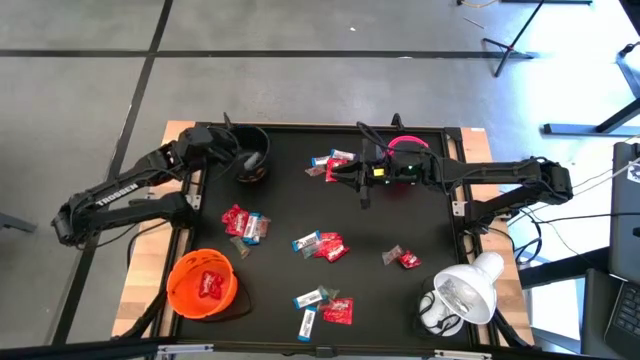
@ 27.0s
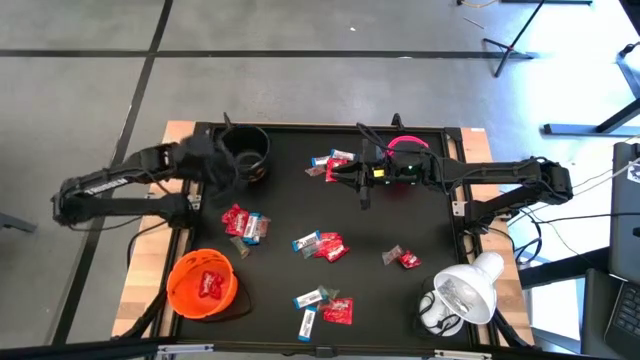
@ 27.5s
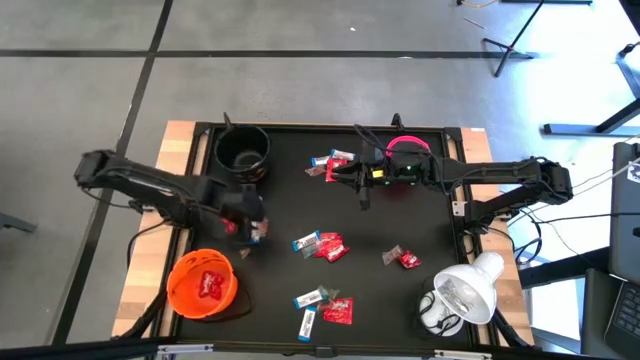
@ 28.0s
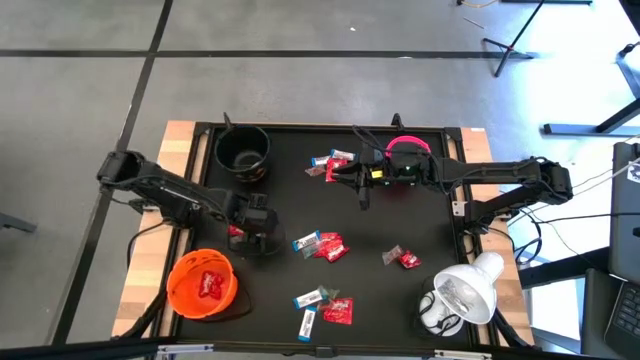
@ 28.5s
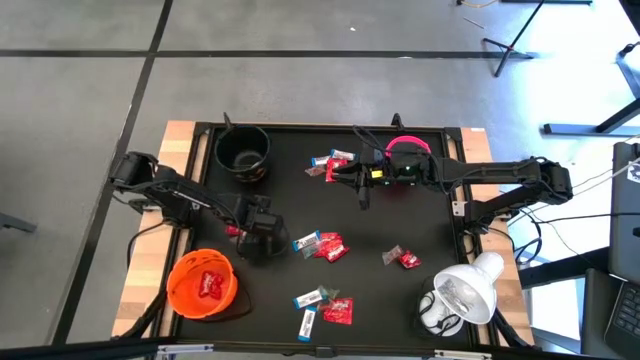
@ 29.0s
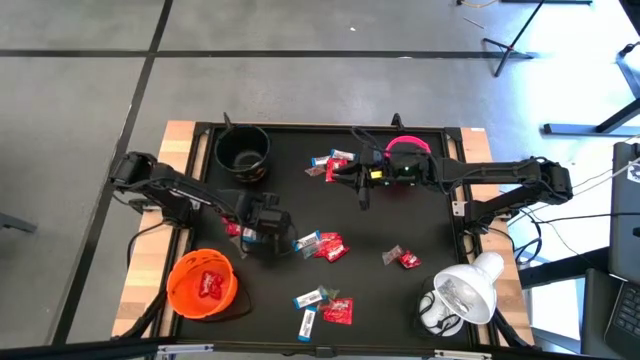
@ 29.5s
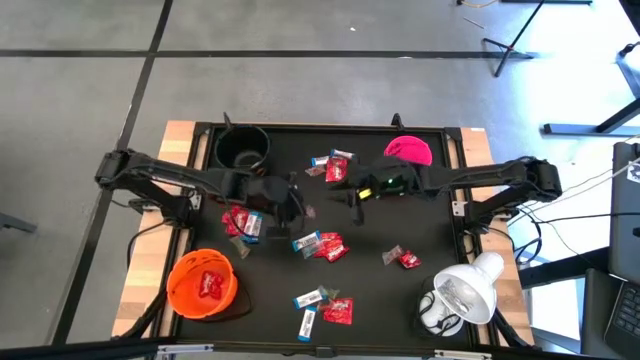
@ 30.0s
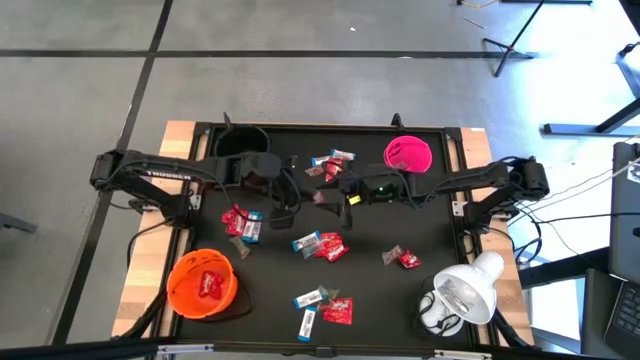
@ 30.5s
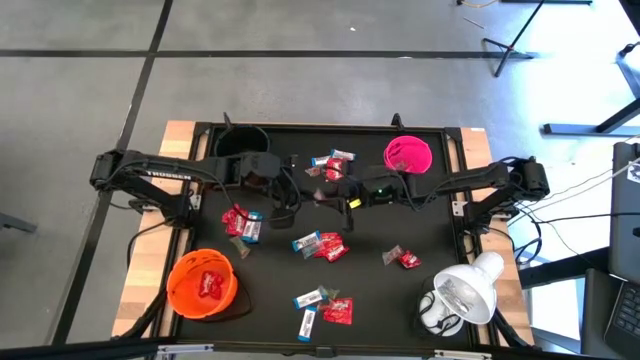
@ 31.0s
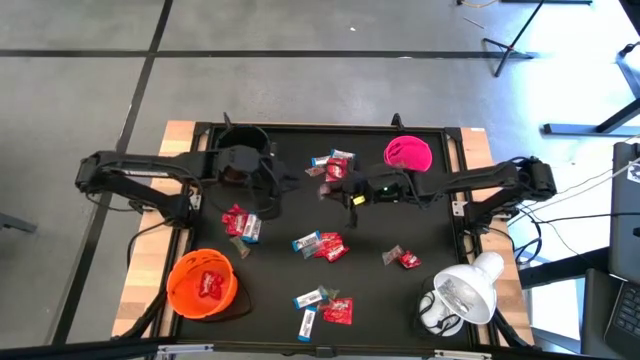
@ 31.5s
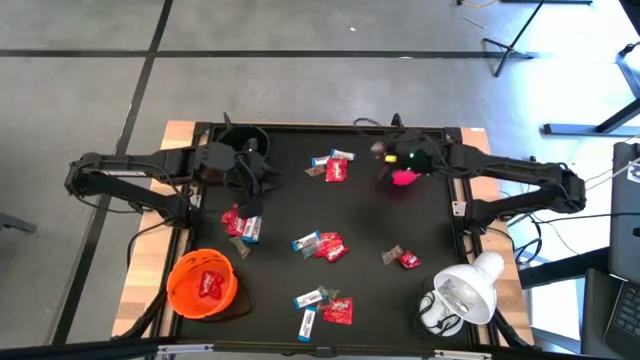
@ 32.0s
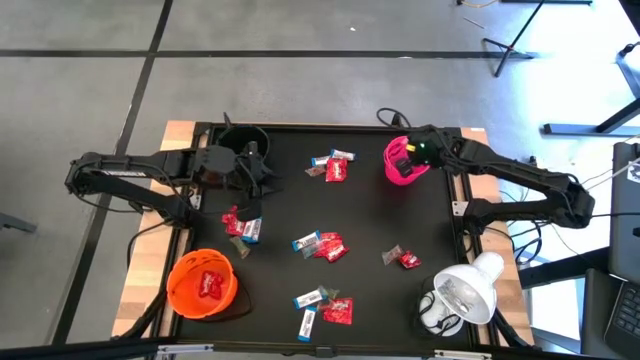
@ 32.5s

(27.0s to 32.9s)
Task: Sort candy
Put the orange gummy into the pink bucket

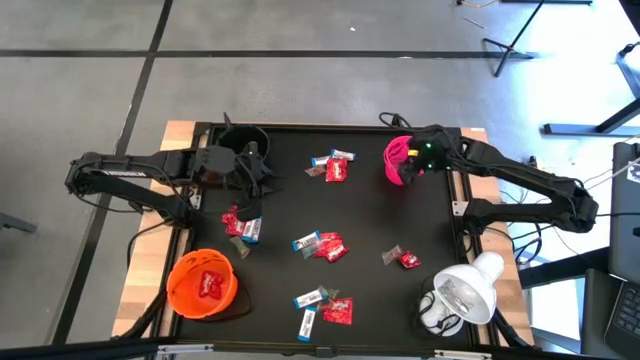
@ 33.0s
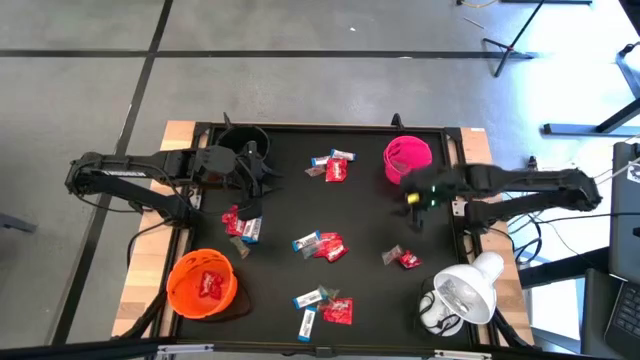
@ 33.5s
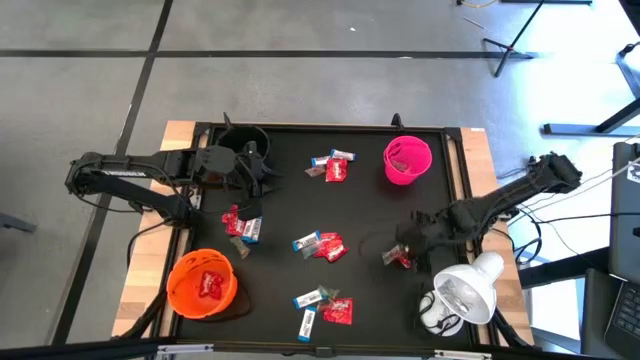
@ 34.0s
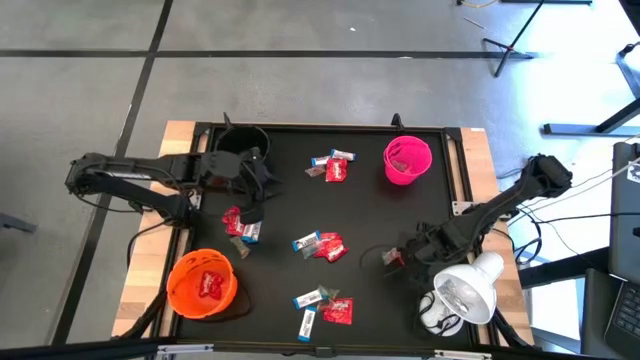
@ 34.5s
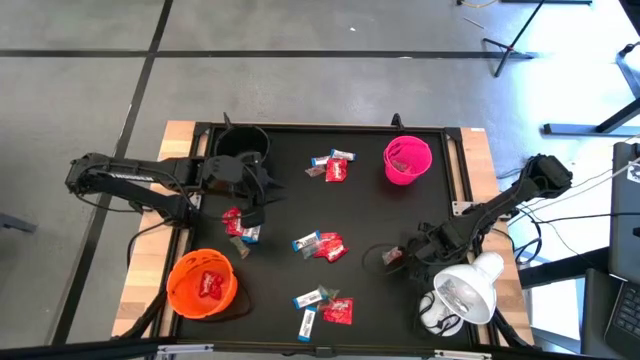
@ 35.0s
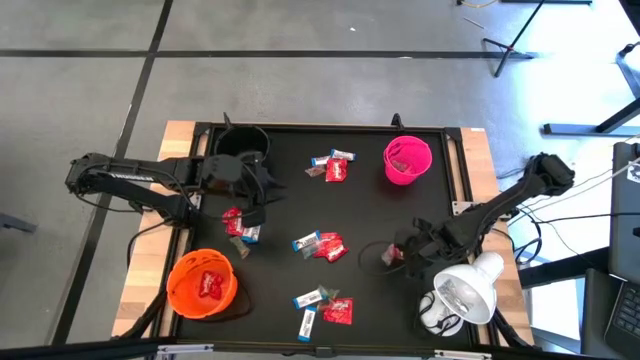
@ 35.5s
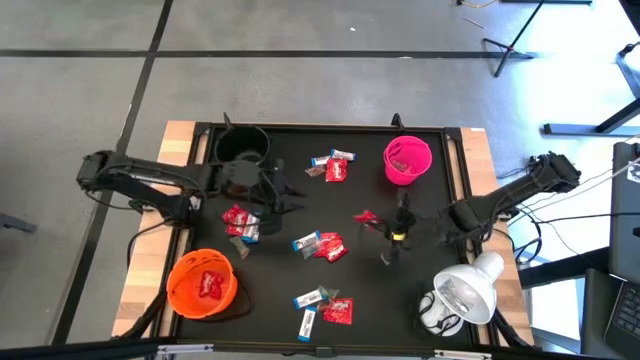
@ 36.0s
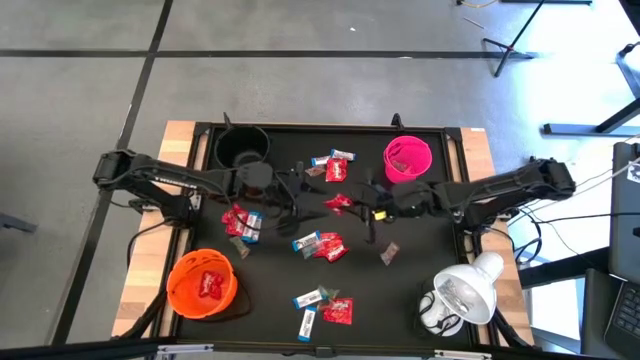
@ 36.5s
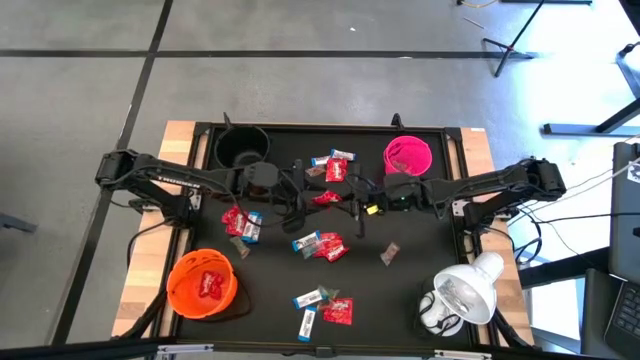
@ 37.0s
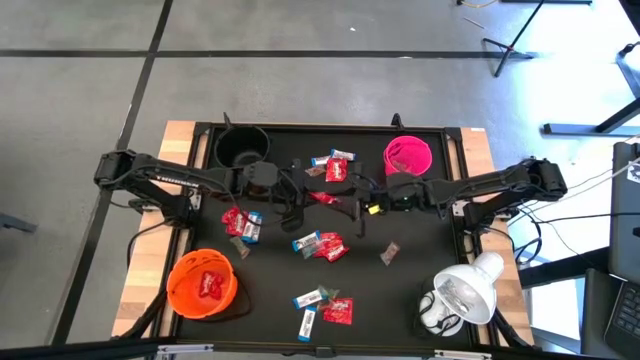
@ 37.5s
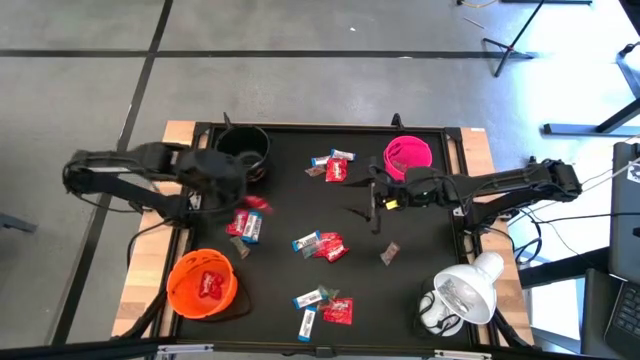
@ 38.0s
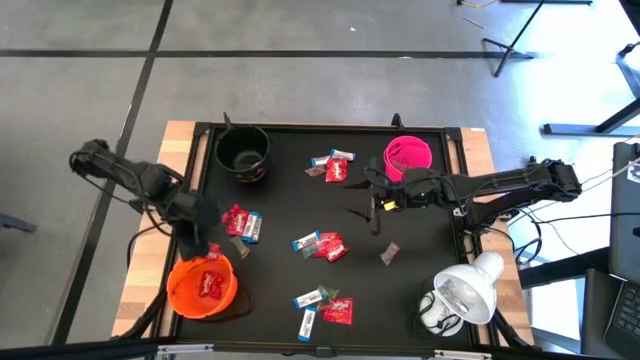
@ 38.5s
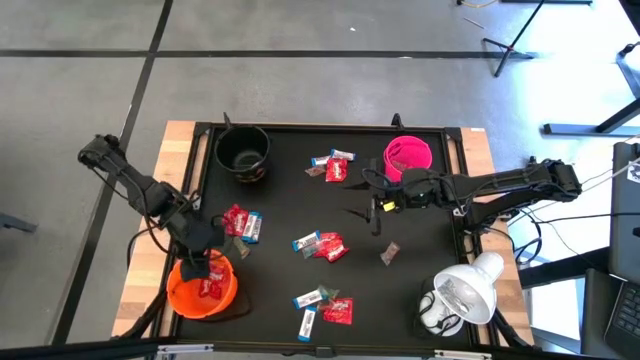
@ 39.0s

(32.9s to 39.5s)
Put the red candy into the orange bucket

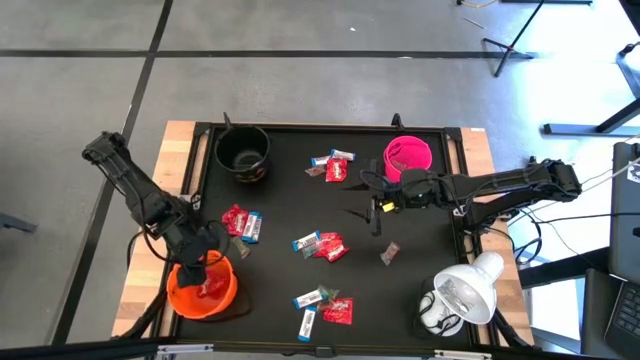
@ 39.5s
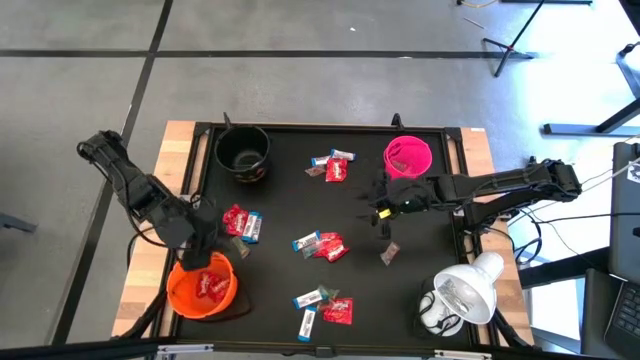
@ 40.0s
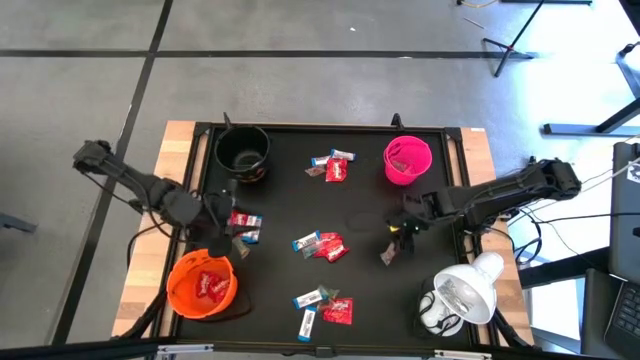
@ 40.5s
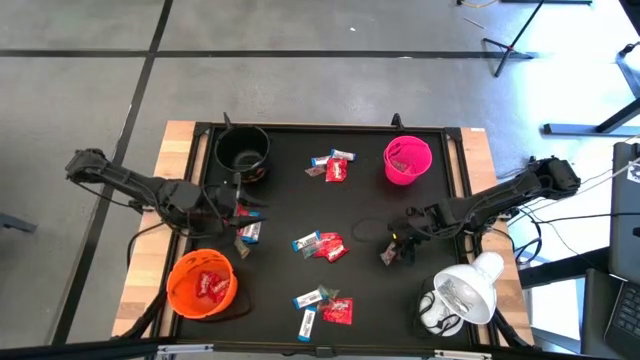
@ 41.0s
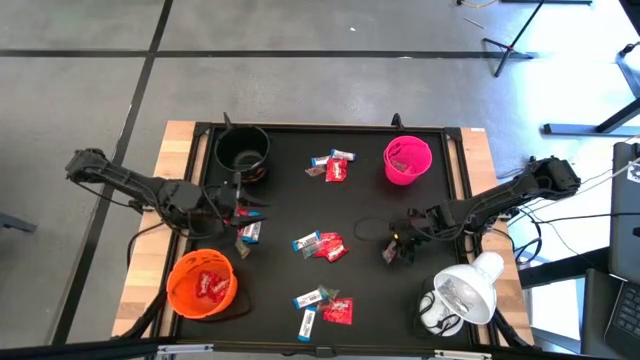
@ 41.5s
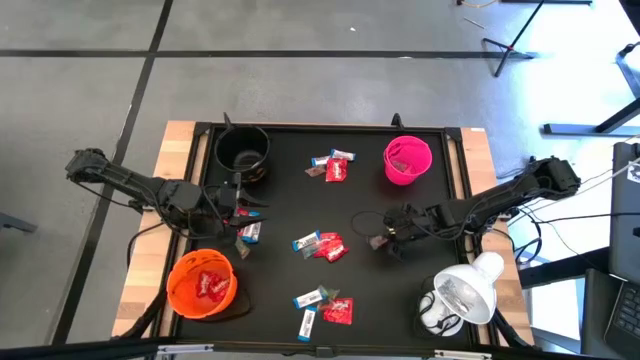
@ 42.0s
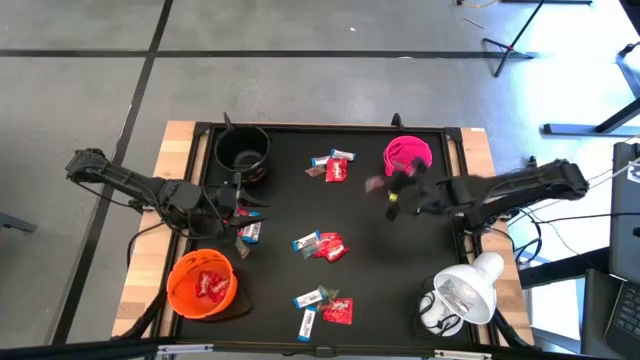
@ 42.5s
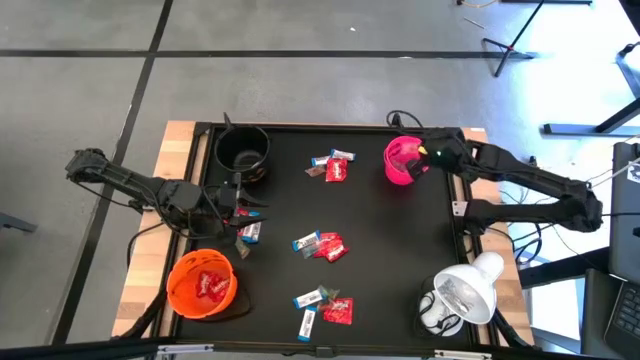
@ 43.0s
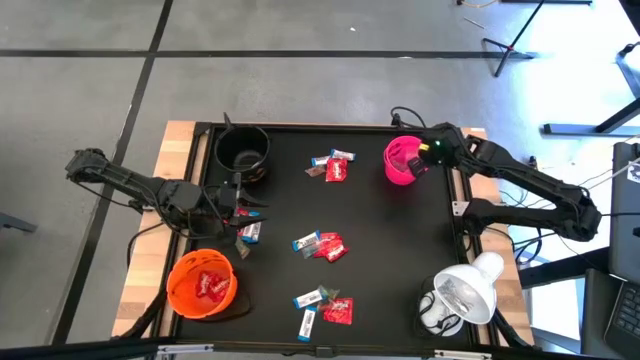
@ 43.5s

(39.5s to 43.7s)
Put the orange gummy into the pink bucket

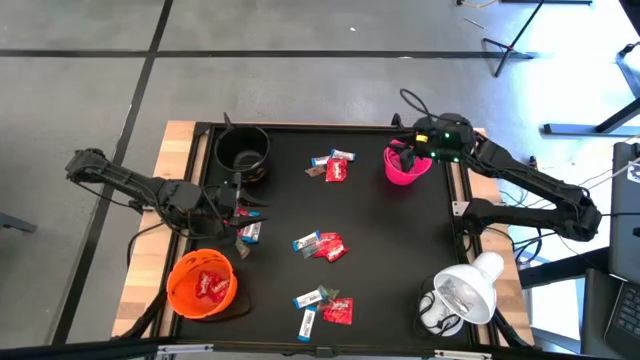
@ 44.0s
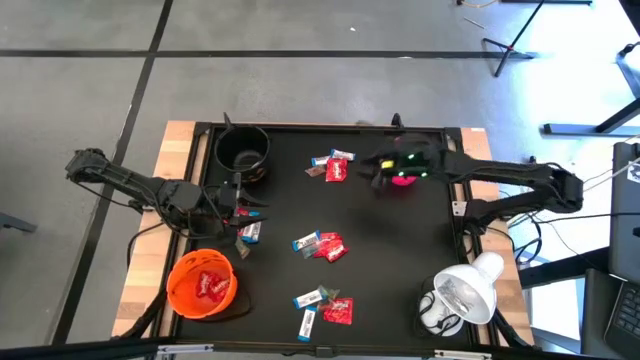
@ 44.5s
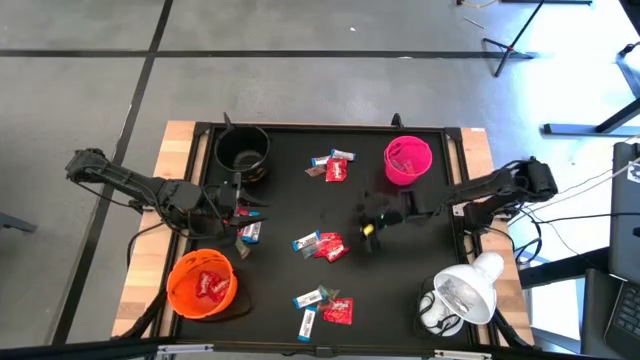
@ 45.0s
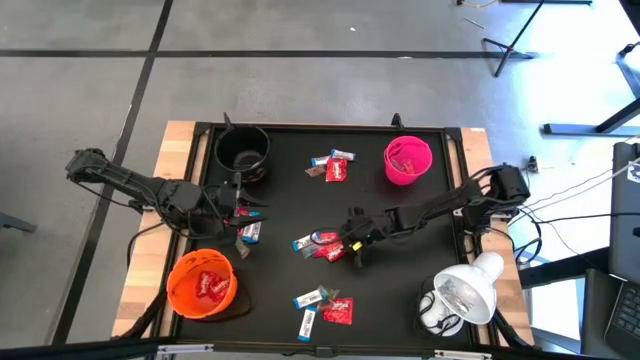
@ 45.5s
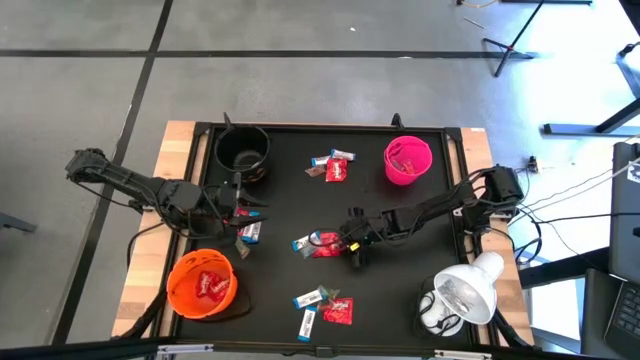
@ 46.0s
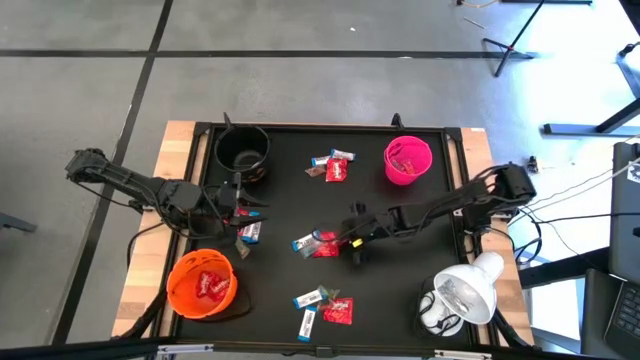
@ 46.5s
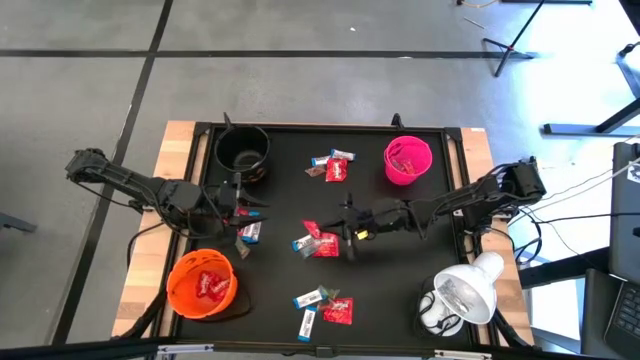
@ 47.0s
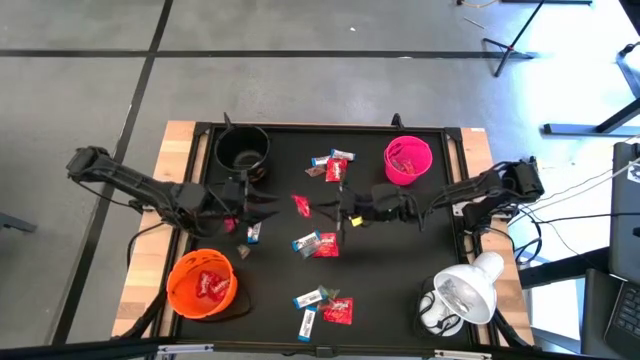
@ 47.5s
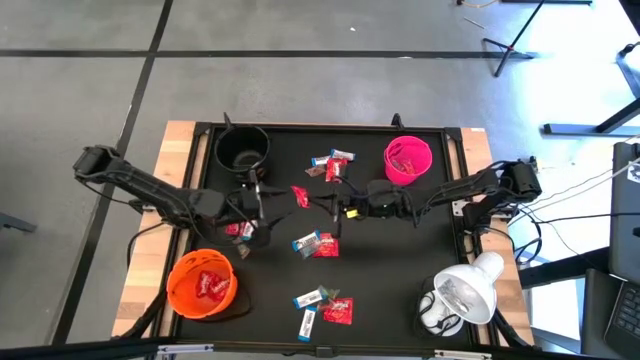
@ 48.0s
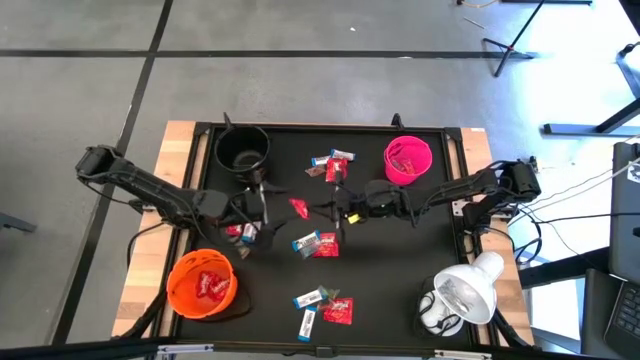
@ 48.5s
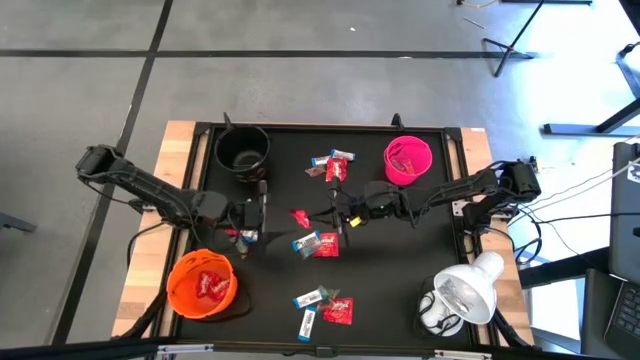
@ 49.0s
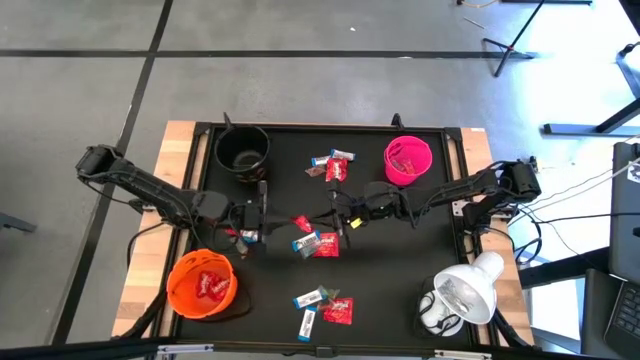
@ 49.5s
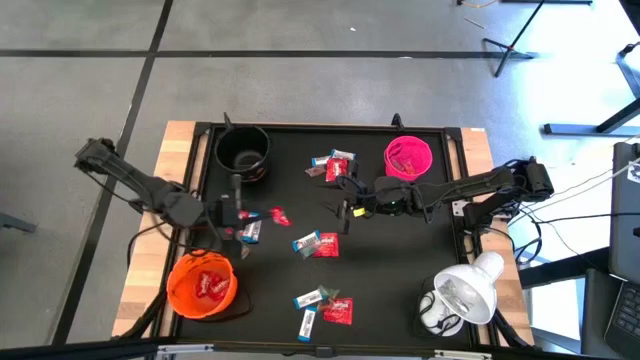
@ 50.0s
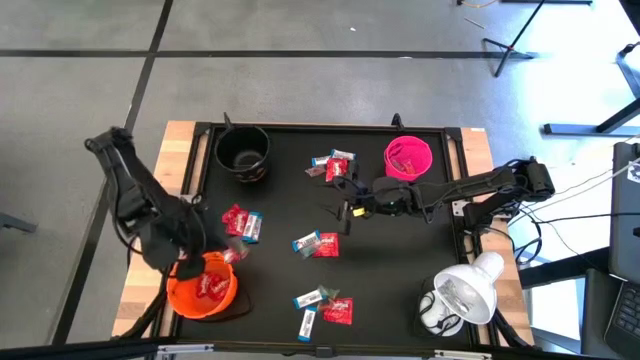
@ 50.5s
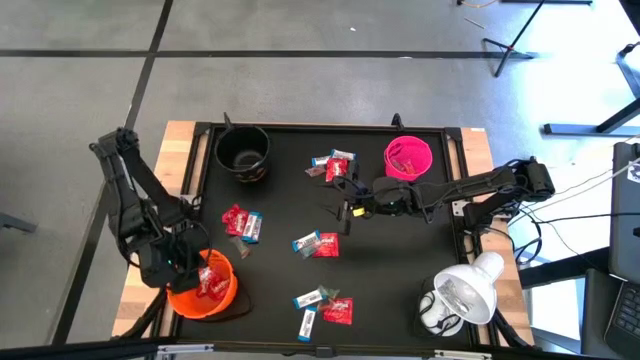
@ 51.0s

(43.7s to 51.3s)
Put the red candy into the orange bucket
